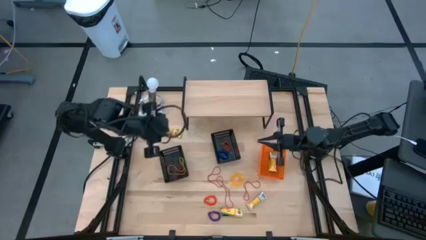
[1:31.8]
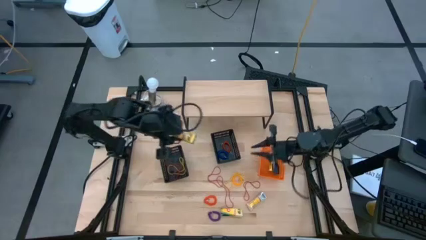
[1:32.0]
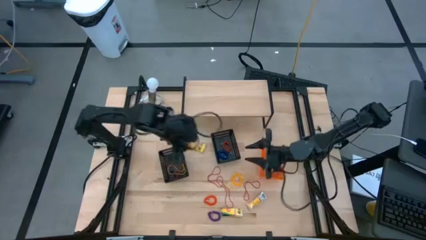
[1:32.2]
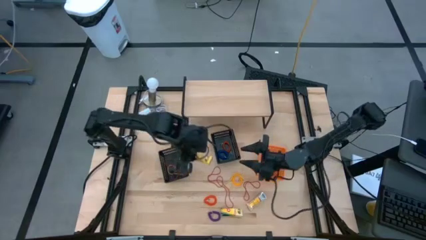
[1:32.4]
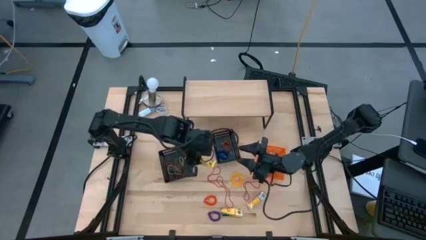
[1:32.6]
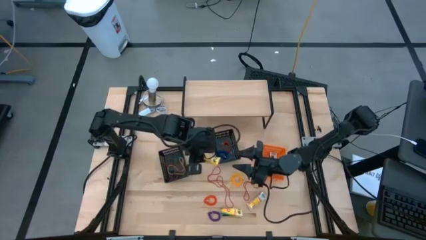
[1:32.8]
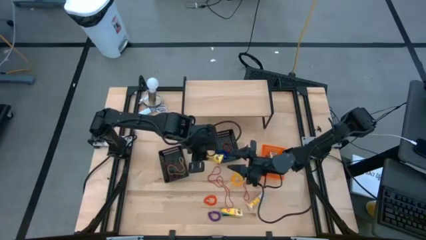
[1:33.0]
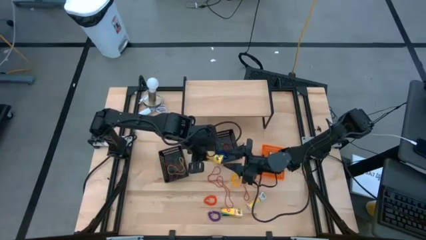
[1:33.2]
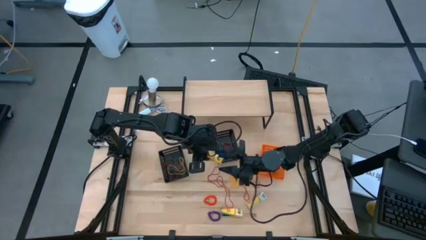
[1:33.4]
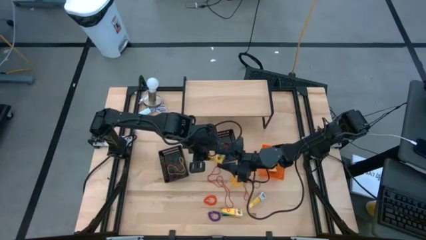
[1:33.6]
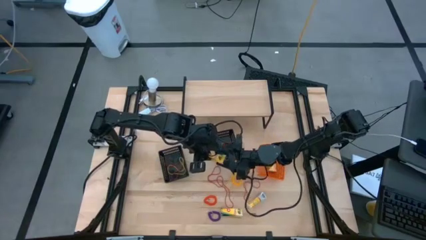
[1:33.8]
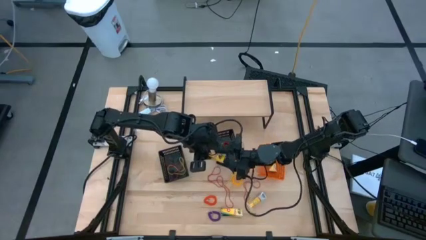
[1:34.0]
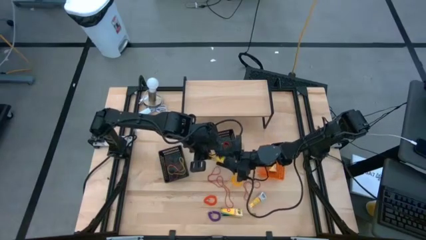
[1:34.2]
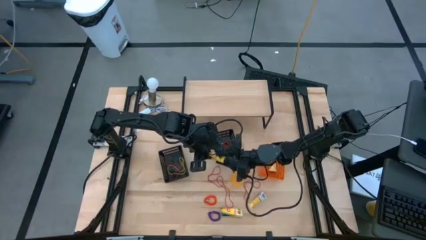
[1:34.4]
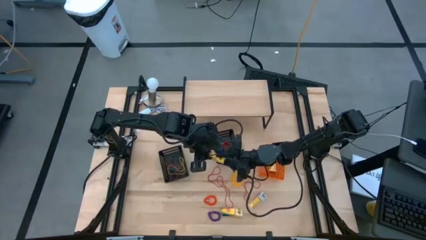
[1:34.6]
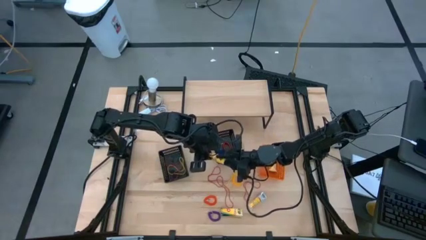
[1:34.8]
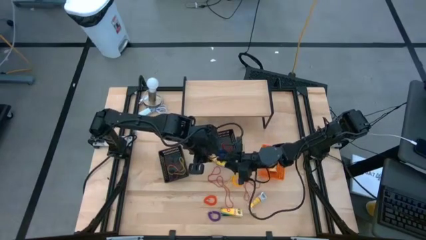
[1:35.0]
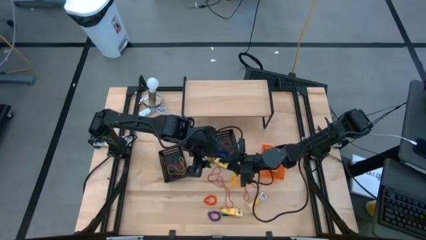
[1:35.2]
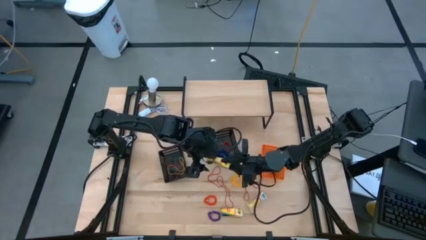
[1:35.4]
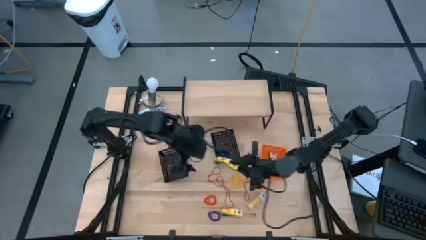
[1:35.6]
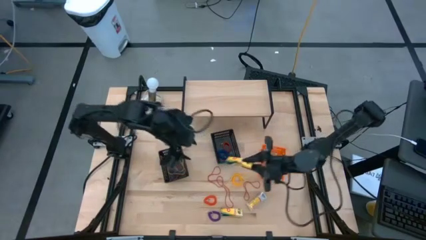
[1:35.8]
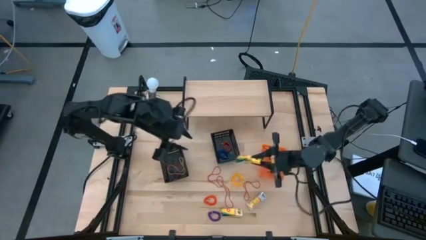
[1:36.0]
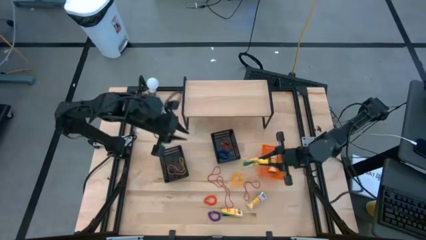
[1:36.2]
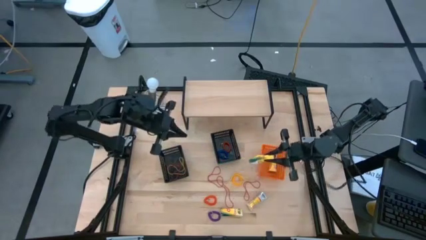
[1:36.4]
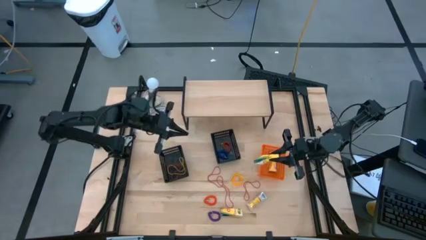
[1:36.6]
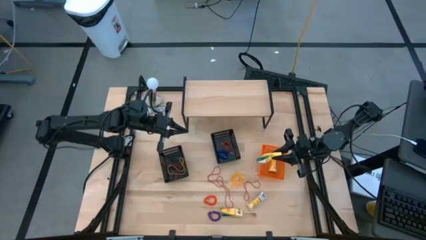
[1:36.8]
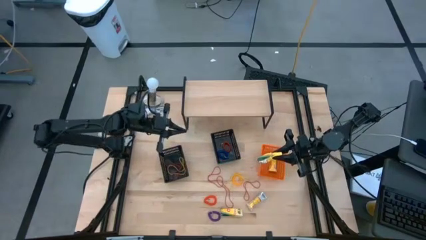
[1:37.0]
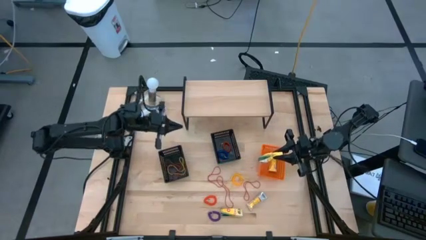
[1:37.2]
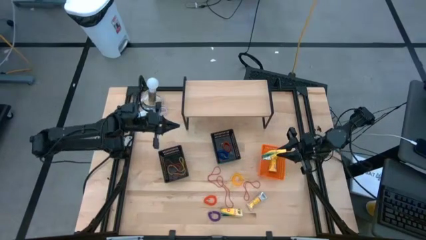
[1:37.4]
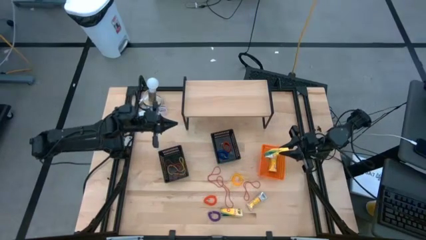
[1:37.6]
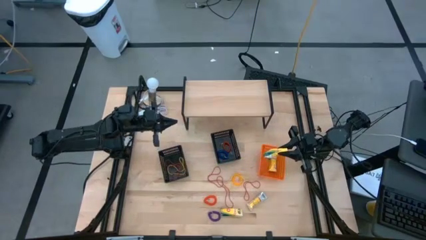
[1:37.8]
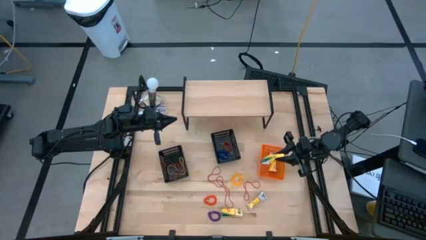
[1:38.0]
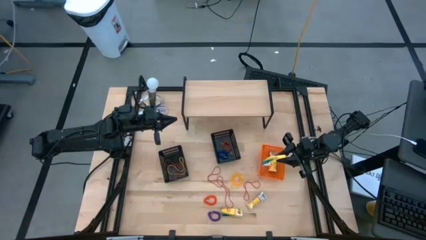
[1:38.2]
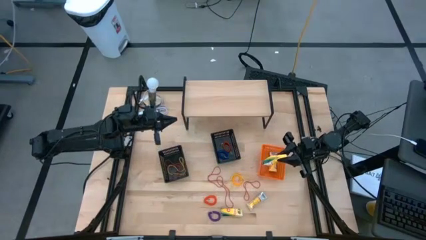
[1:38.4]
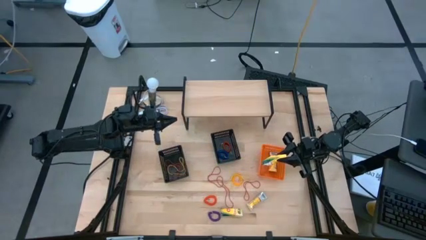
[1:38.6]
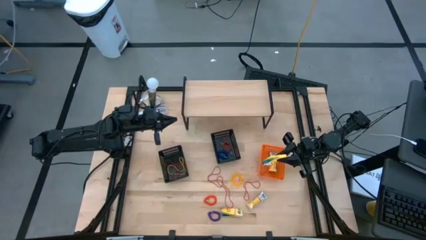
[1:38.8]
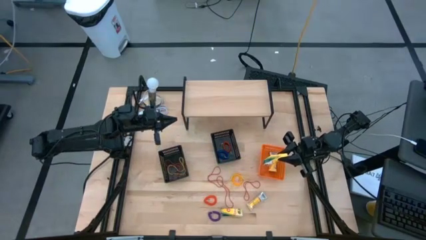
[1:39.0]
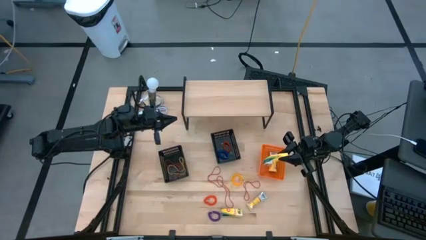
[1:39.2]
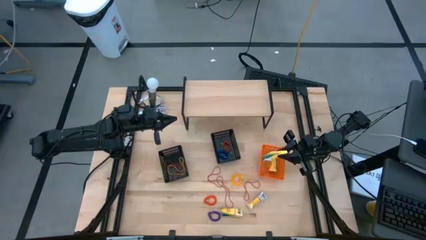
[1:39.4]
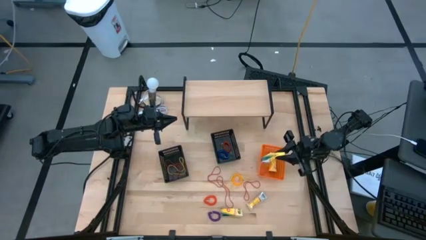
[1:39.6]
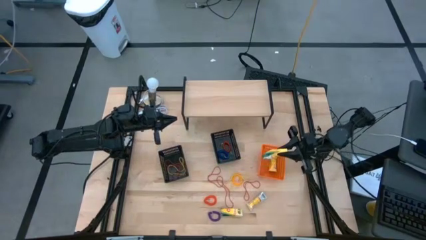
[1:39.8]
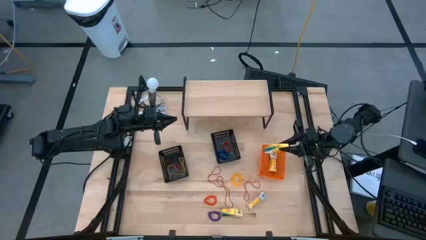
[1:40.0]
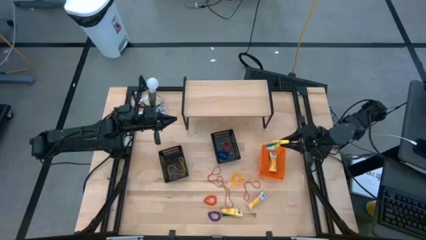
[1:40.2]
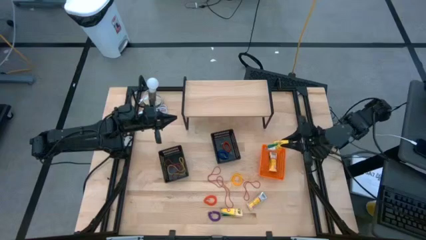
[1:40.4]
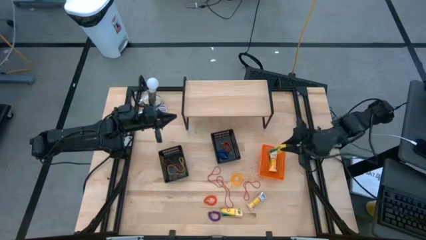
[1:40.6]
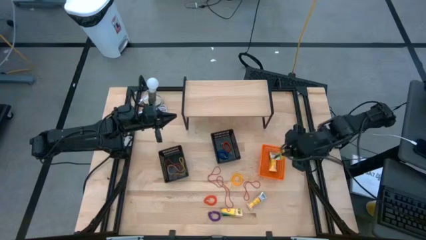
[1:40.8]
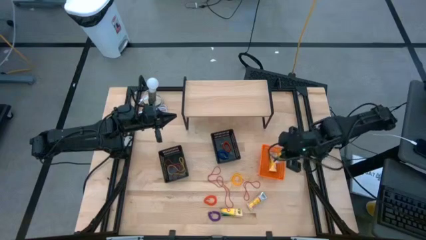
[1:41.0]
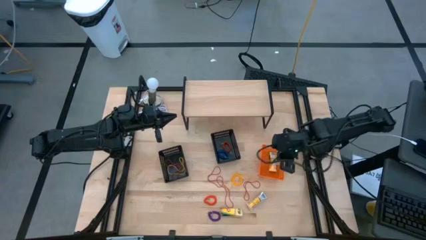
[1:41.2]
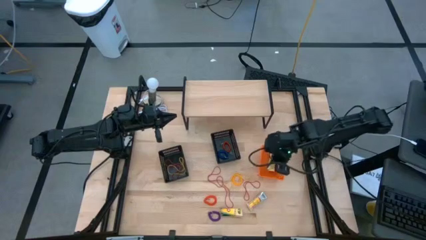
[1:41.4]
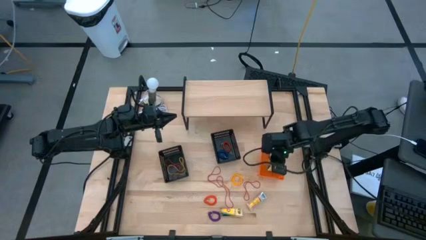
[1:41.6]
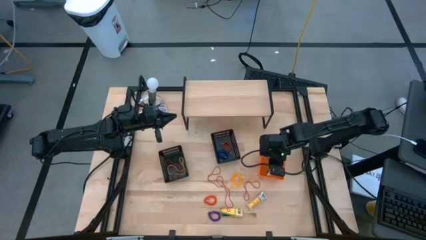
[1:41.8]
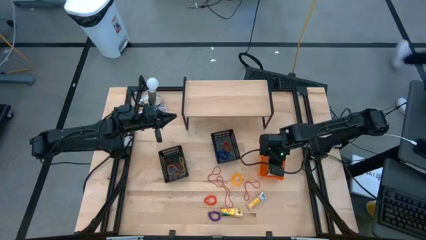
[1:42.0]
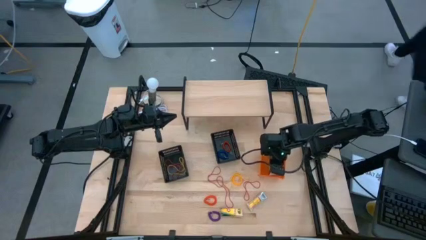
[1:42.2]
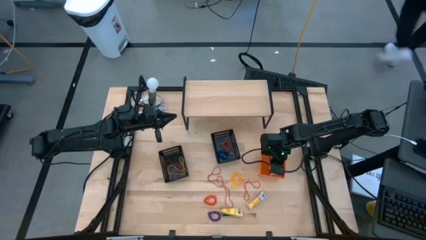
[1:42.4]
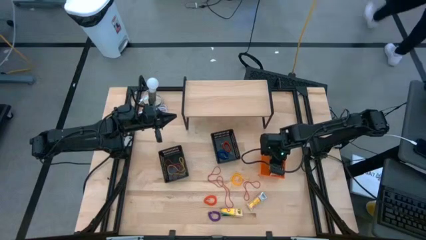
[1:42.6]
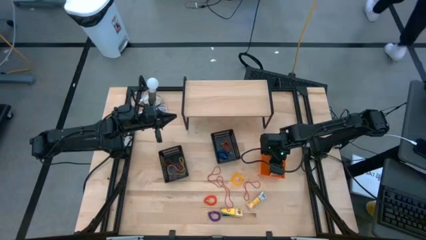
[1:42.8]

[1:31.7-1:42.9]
Task: Pick & Place Office Desk Supplies
Put the crayon into the orange bin

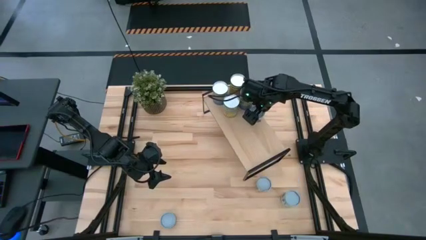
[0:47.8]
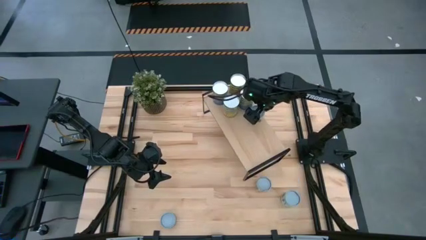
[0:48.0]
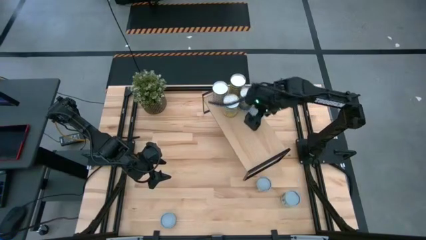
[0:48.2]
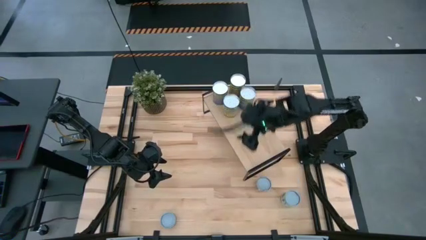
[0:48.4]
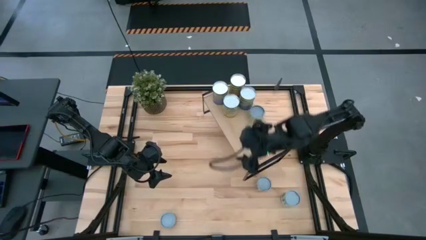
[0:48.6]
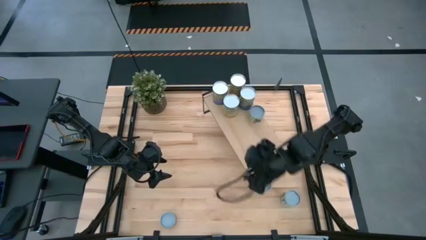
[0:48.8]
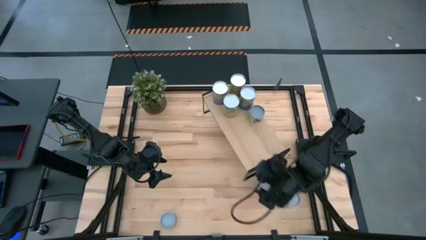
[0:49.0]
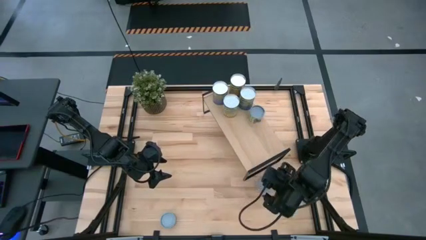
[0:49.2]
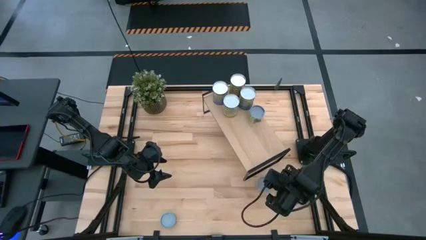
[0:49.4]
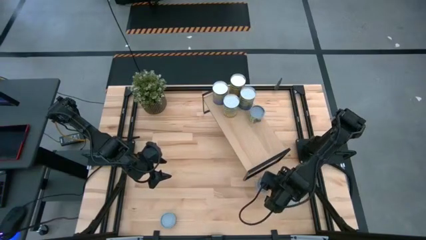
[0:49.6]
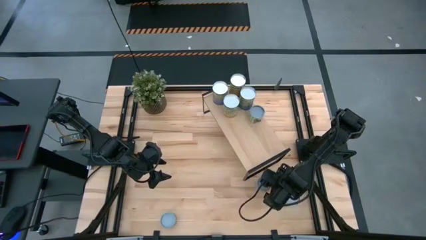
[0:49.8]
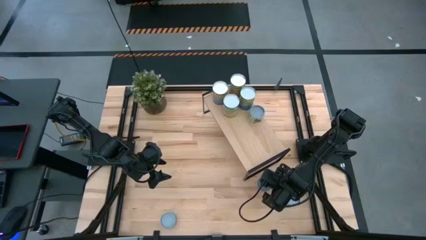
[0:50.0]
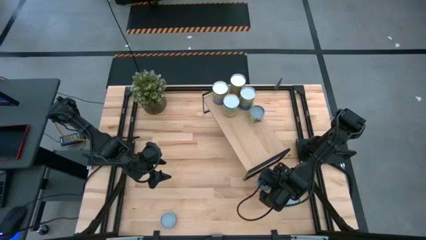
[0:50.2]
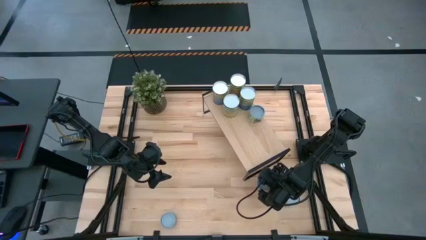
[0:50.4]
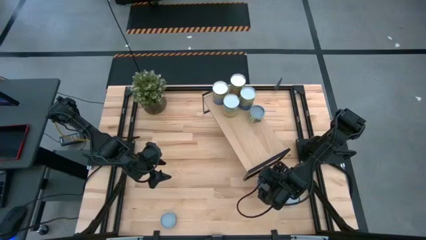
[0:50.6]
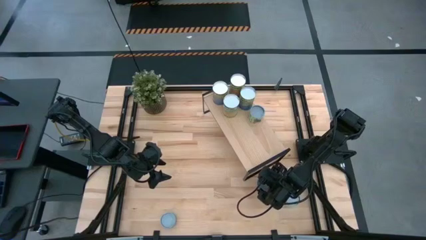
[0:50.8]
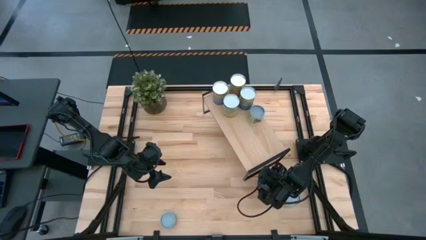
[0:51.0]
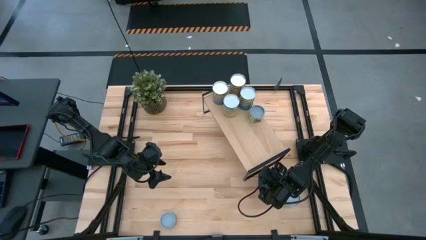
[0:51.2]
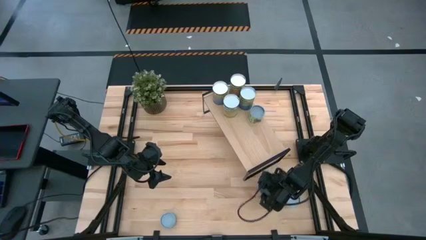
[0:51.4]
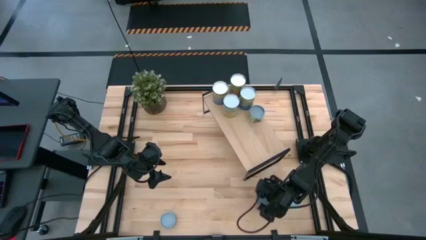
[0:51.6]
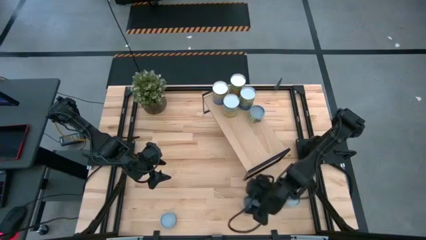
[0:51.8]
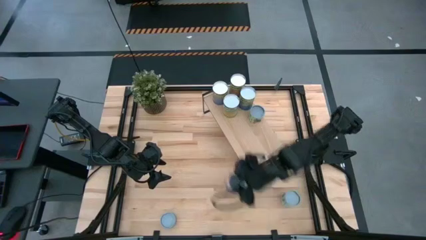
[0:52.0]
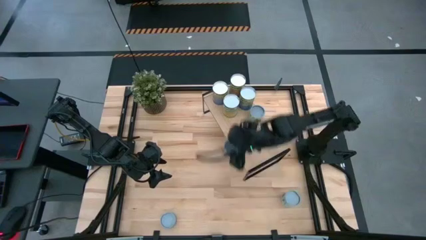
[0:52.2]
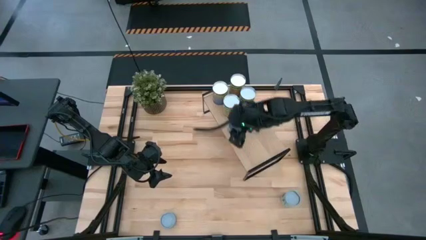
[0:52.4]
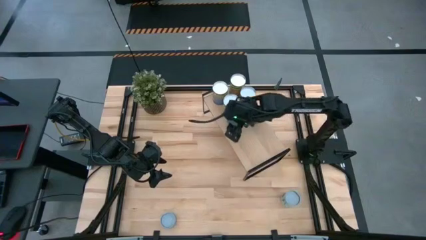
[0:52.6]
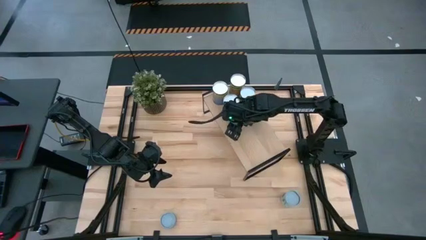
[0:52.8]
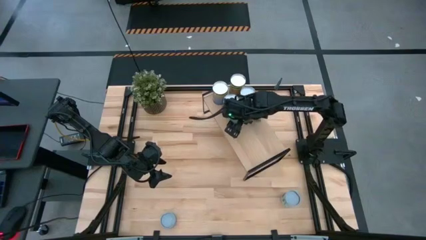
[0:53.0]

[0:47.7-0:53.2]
Task: Pick and place cans onto a shelf
Put the canned diced tomatoes on the shelf

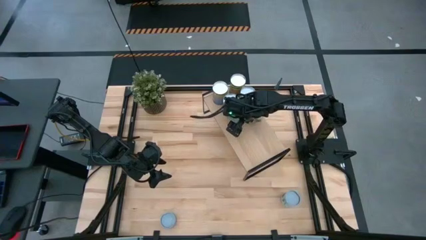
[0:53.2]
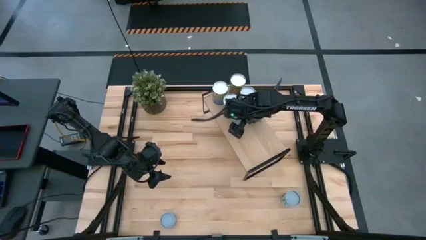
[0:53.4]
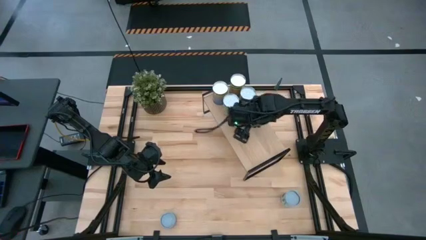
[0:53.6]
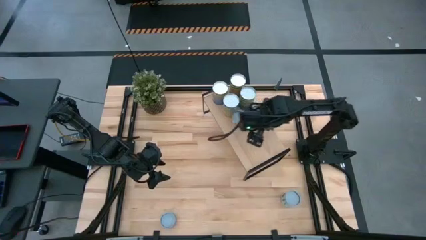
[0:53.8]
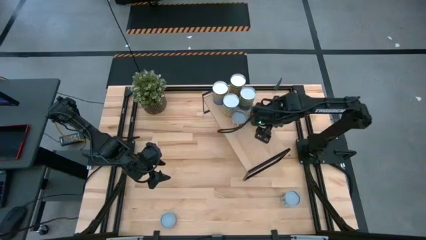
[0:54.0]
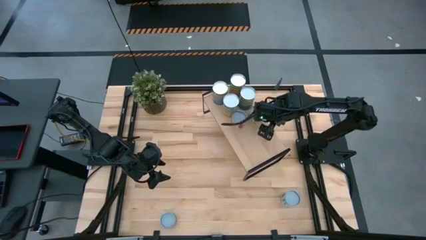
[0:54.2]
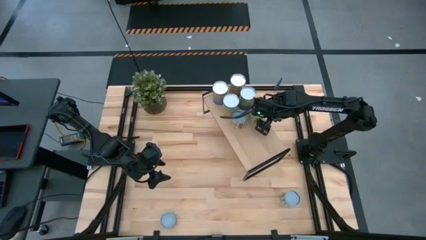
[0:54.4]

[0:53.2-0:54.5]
Adjust the canned green peas on the shelf
